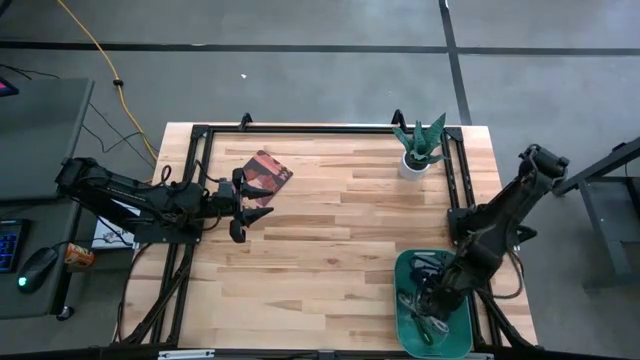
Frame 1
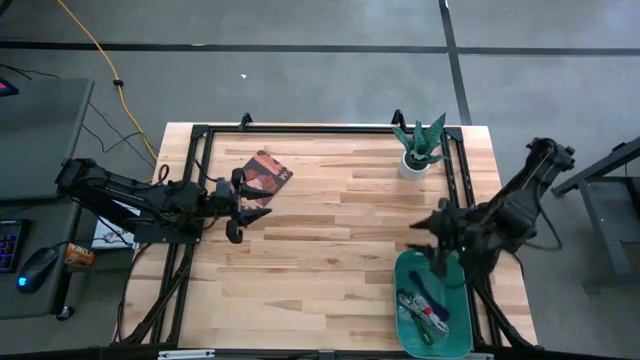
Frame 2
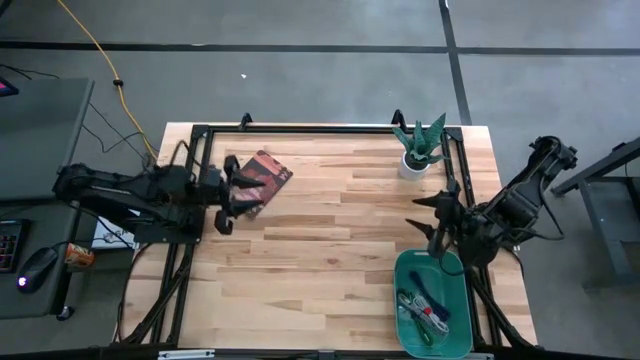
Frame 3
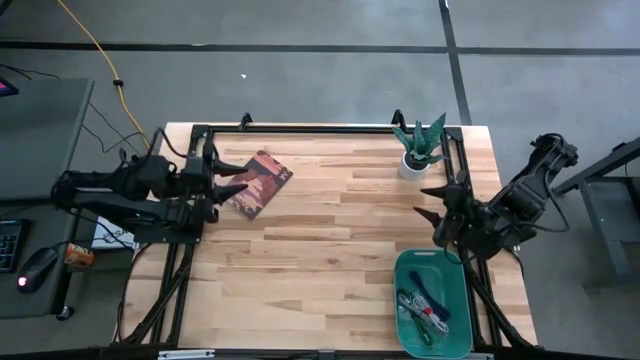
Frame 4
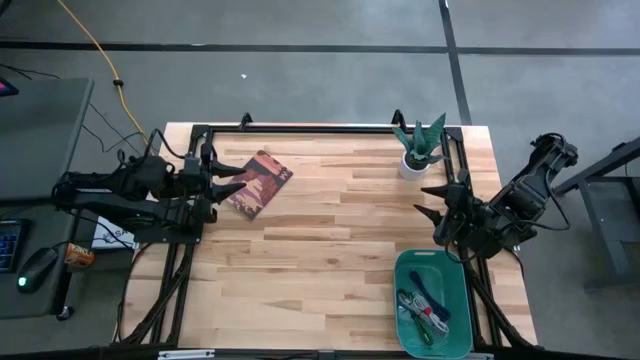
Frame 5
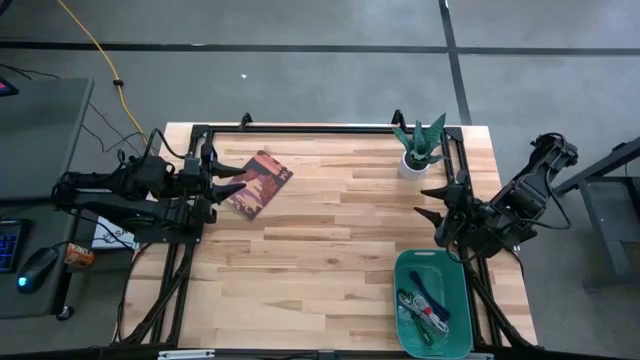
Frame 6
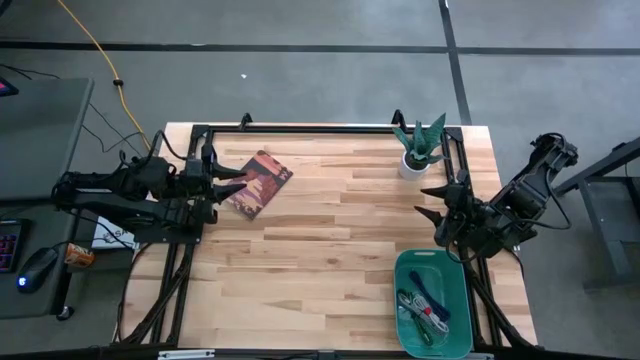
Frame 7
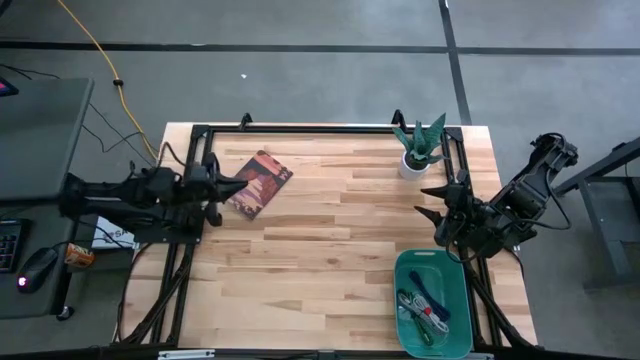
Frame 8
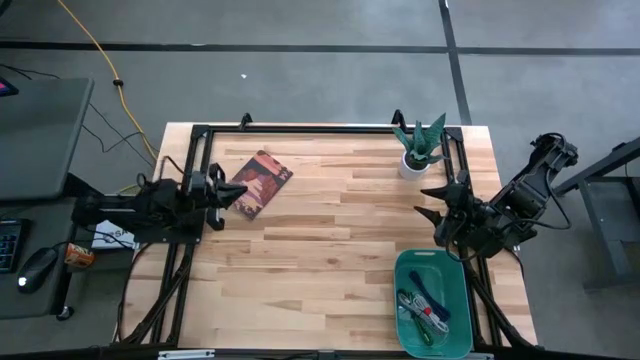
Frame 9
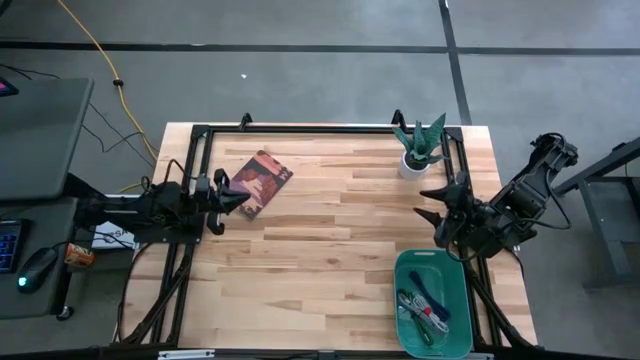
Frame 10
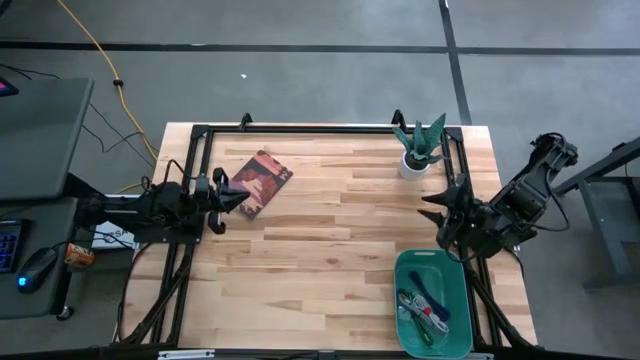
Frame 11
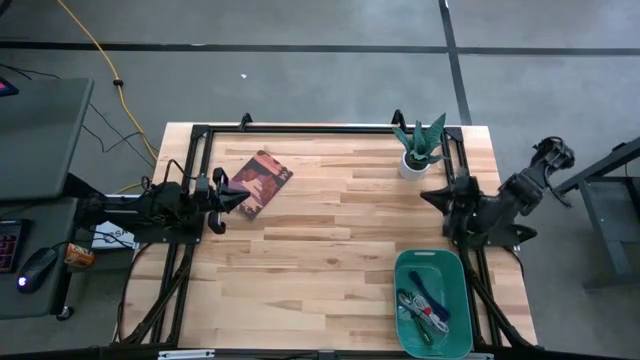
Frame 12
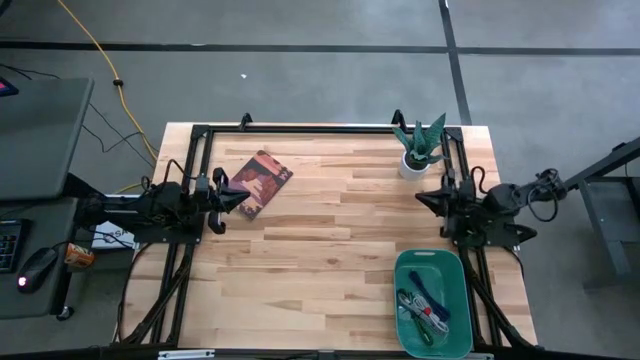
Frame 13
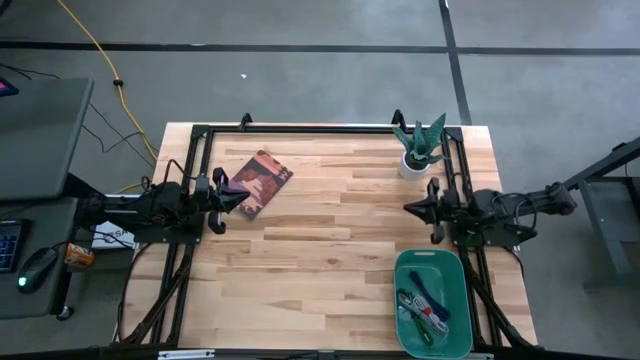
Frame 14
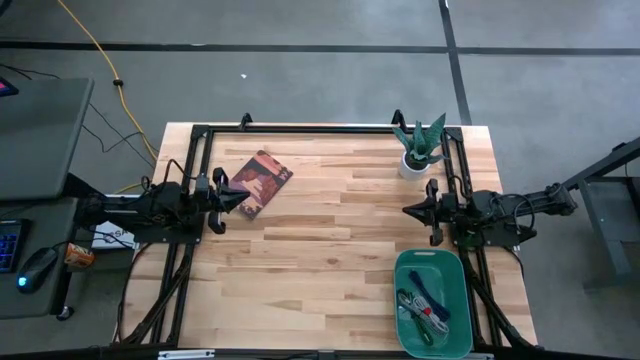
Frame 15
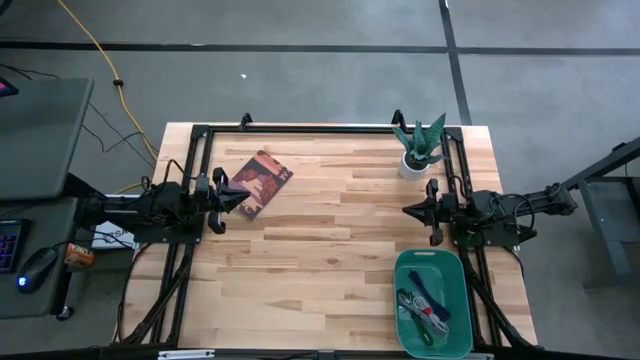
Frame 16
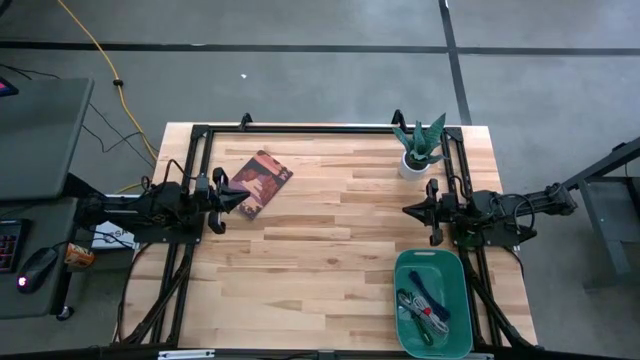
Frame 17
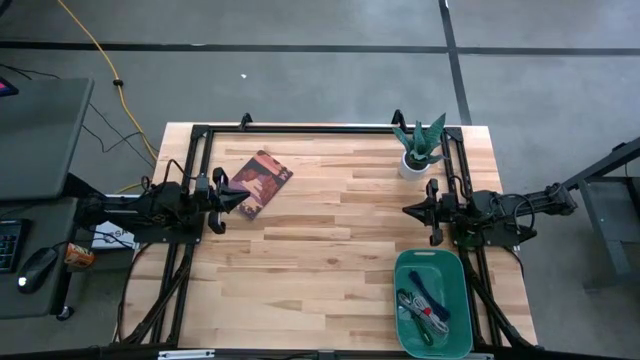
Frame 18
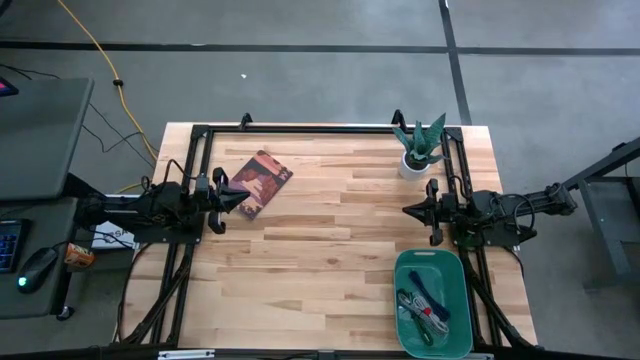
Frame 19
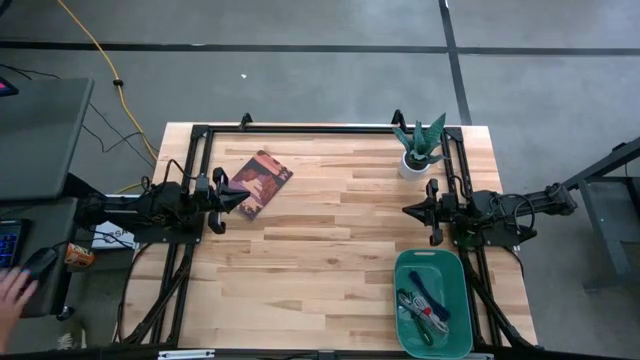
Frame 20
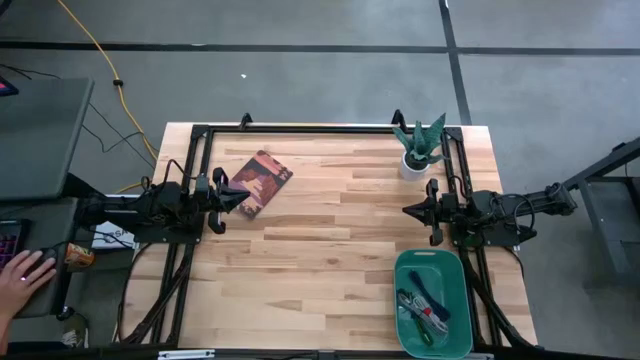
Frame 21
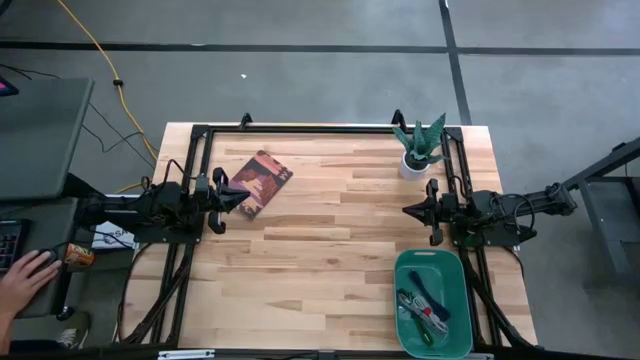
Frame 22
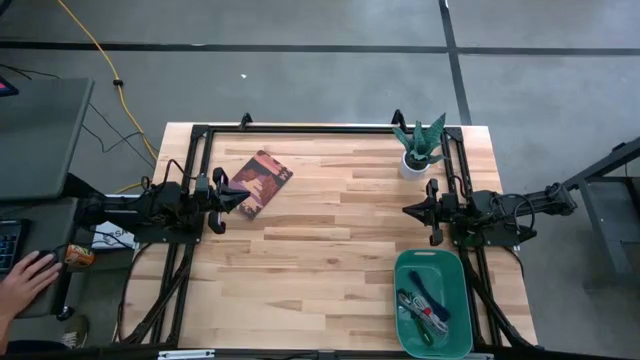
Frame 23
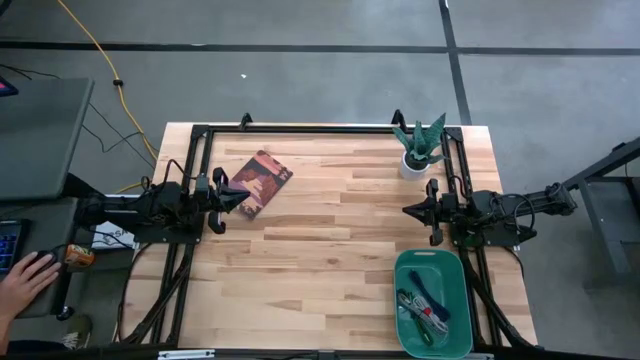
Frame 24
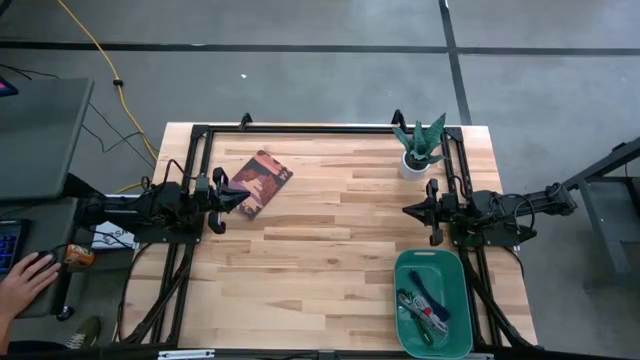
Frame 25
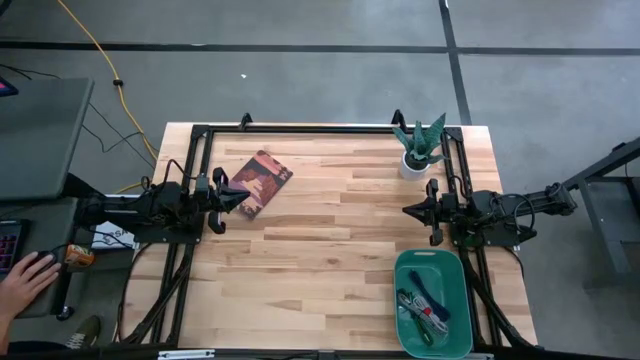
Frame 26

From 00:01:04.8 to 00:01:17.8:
Task: Pick and place USB-C Cables
Return to Home Position

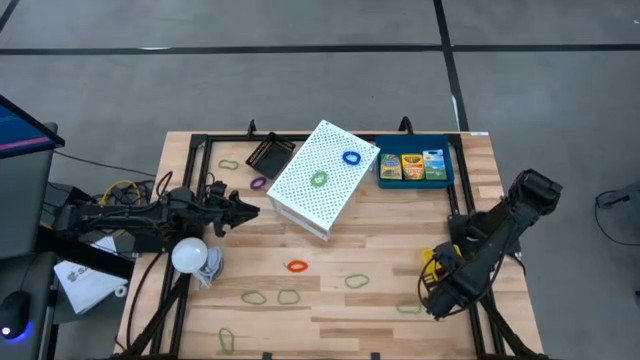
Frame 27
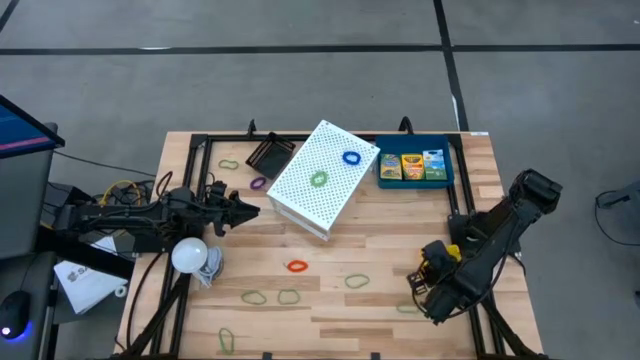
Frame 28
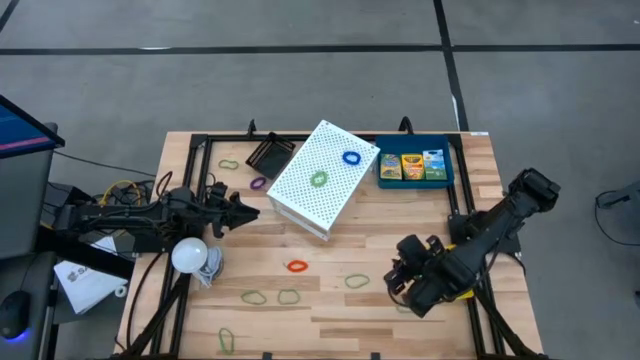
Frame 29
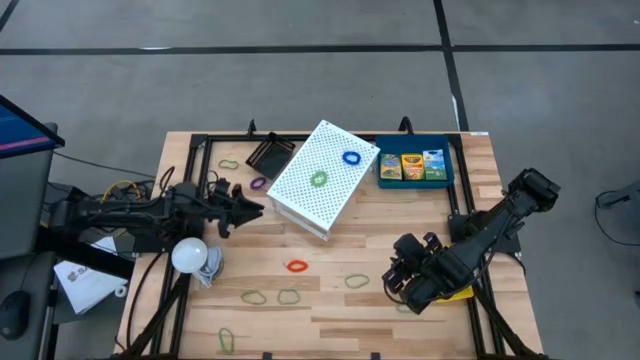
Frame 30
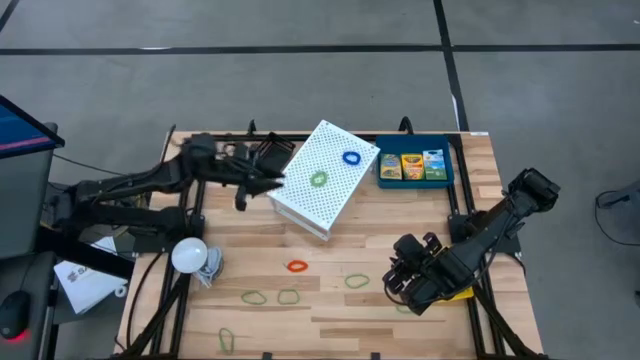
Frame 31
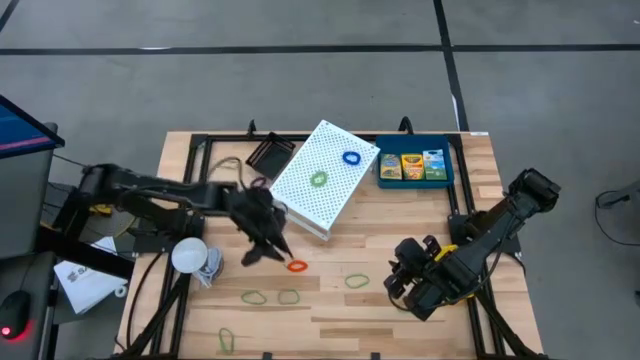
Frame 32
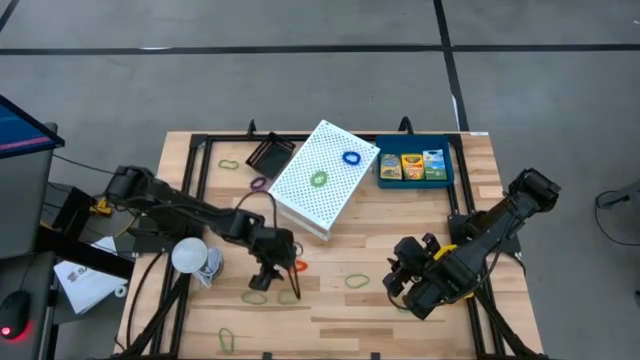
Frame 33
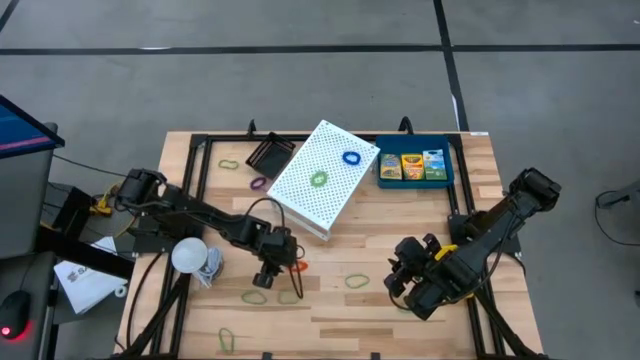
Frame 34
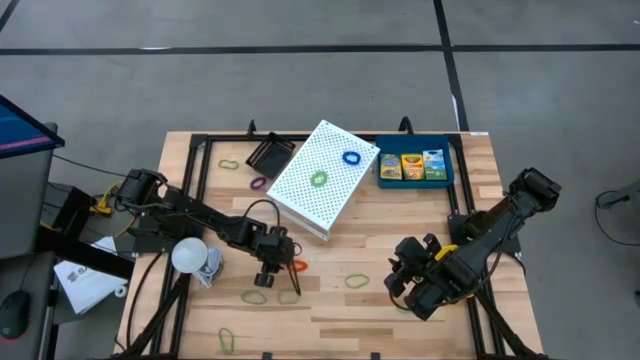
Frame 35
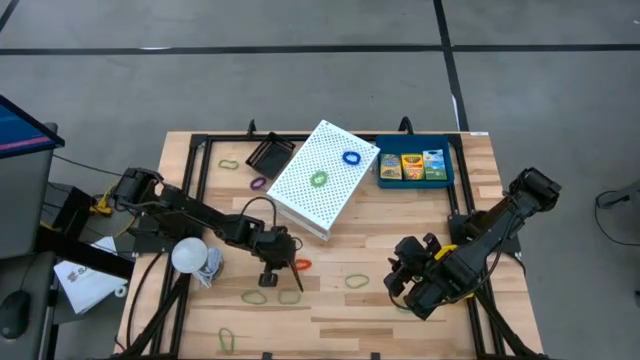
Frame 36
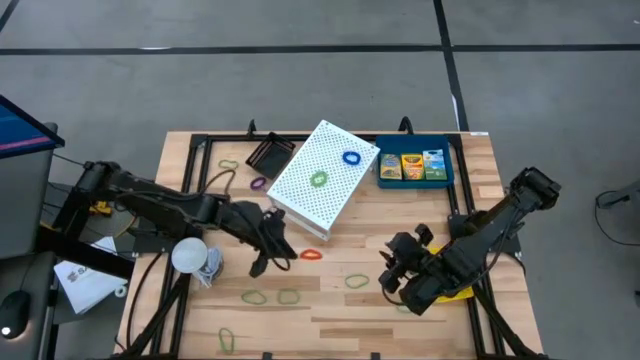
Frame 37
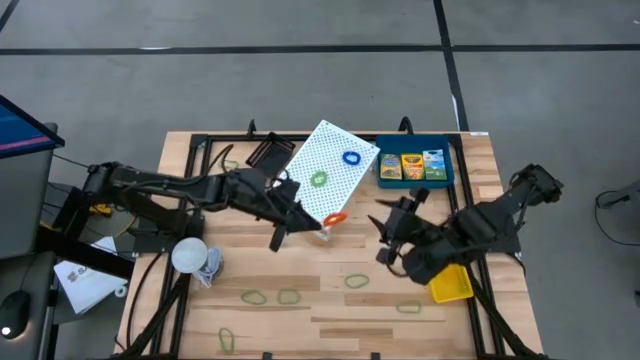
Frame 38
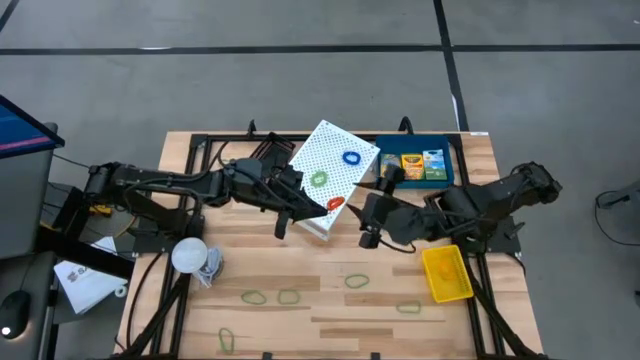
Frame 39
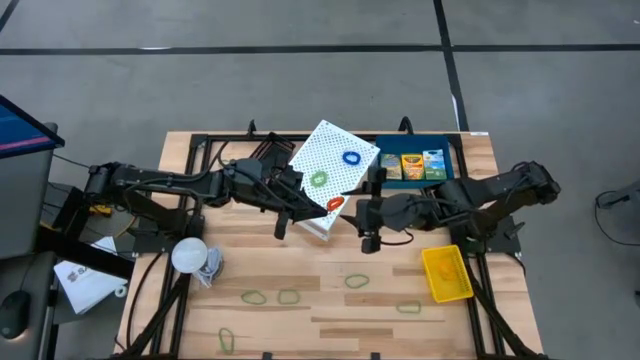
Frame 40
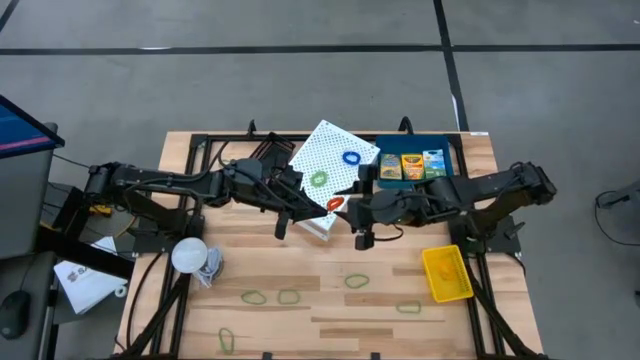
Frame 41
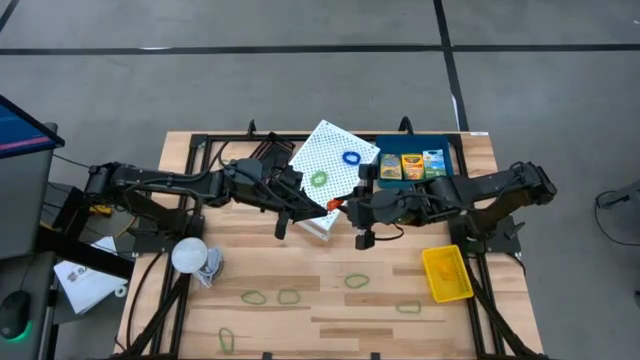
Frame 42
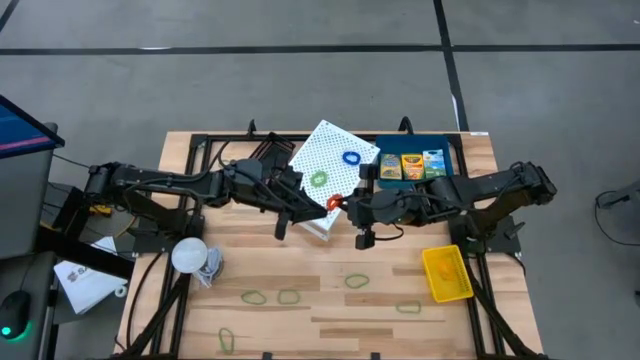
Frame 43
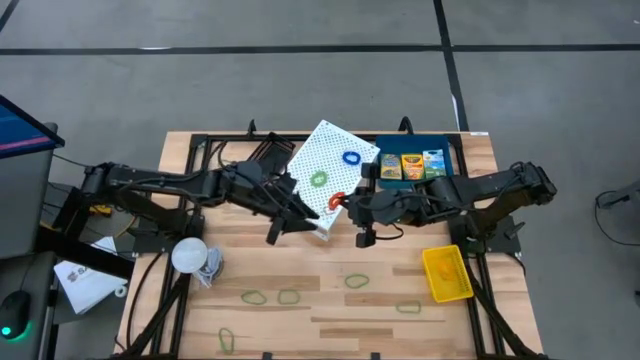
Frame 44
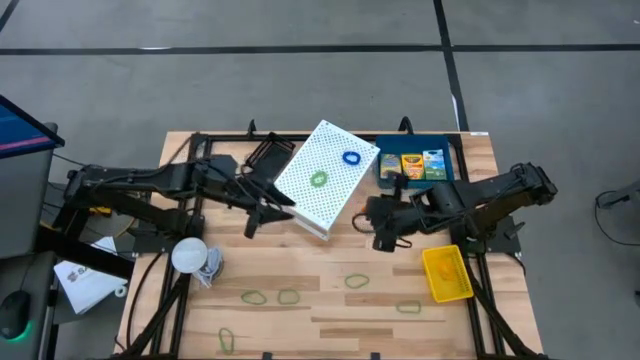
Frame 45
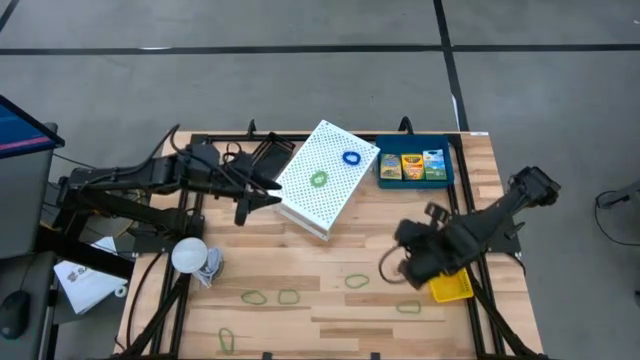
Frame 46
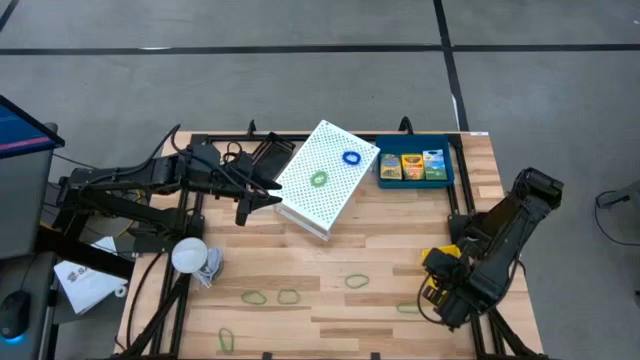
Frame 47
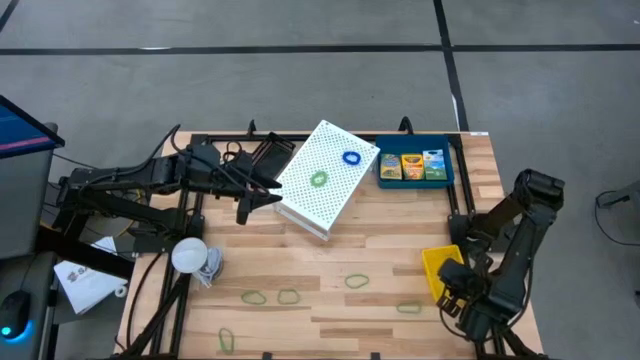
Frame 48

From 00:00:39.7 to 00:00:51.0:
Task: Pick & Place Office Desk Supplies
Put the orange spring keychain into the yellow bin
